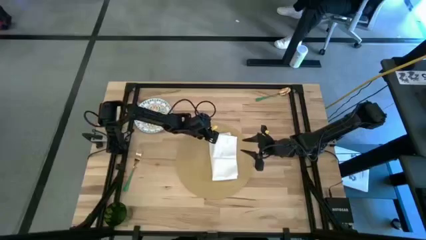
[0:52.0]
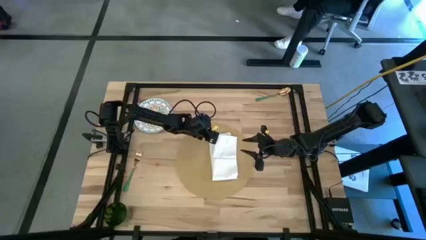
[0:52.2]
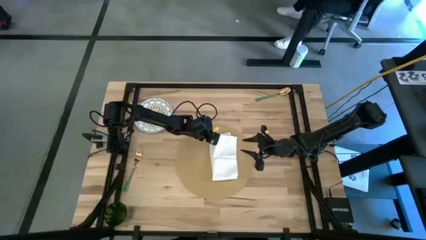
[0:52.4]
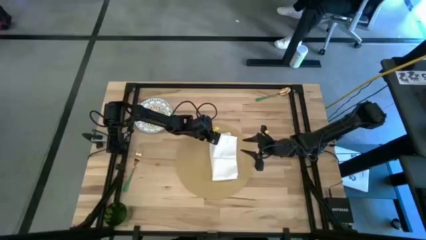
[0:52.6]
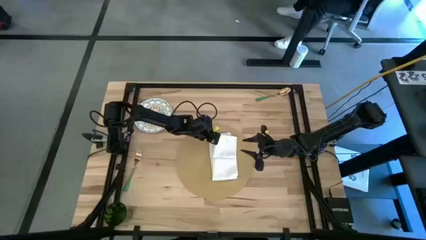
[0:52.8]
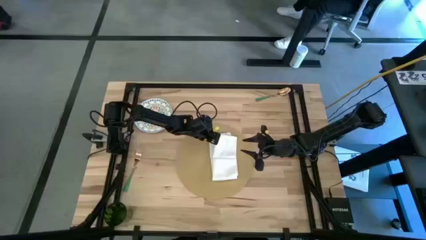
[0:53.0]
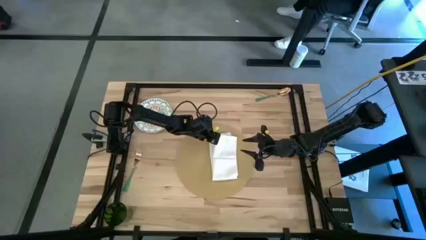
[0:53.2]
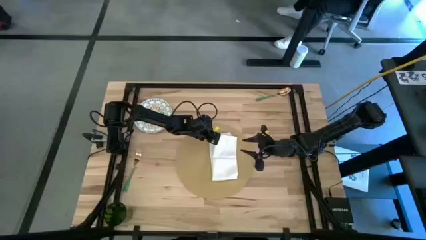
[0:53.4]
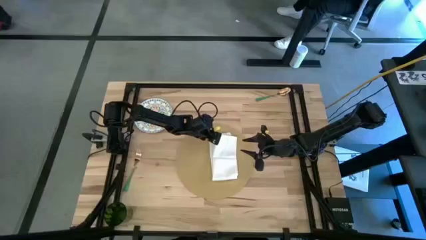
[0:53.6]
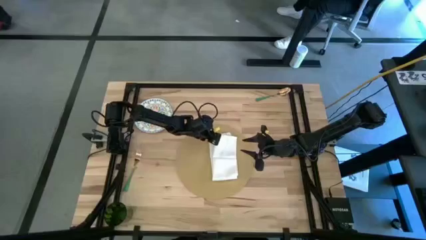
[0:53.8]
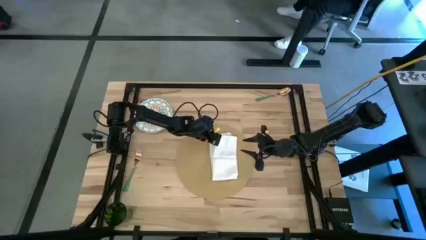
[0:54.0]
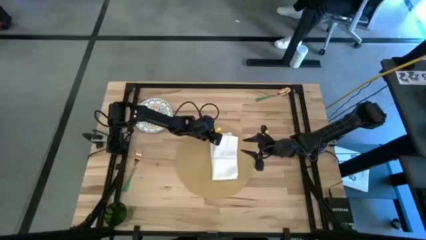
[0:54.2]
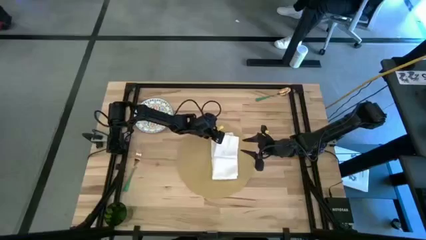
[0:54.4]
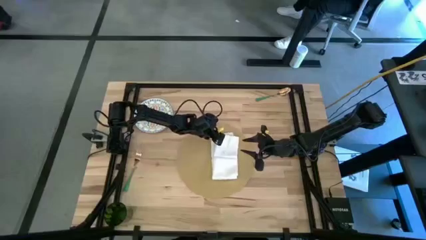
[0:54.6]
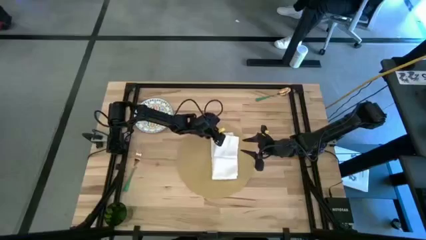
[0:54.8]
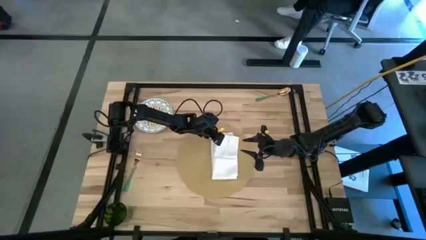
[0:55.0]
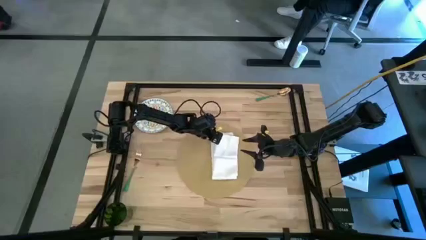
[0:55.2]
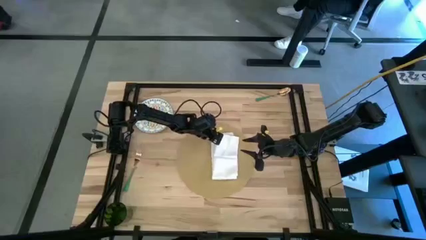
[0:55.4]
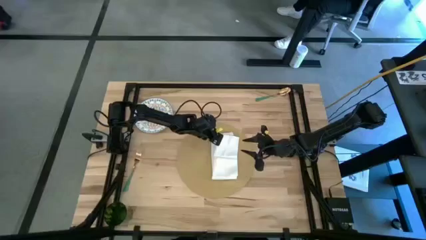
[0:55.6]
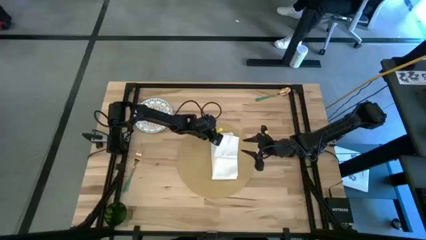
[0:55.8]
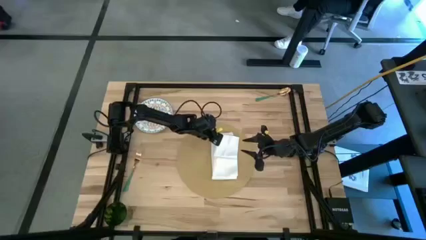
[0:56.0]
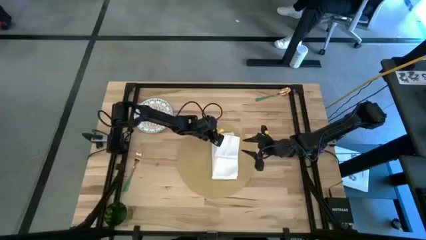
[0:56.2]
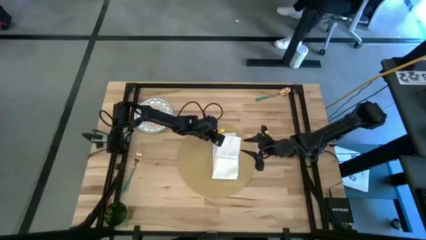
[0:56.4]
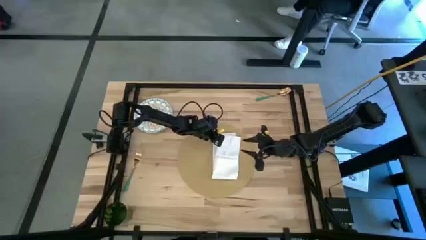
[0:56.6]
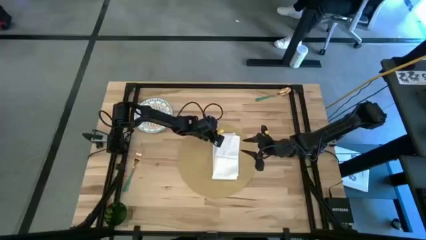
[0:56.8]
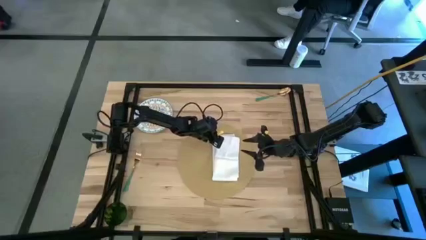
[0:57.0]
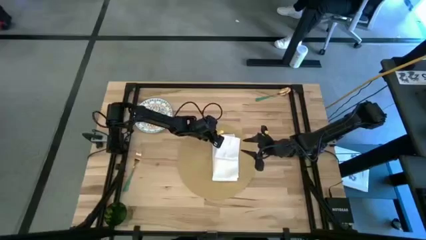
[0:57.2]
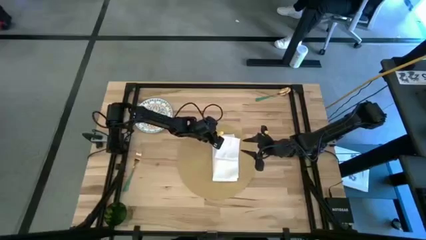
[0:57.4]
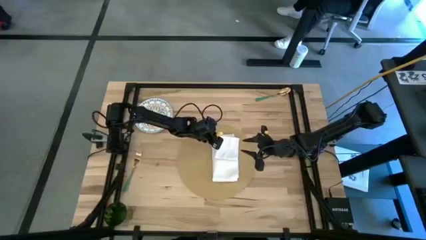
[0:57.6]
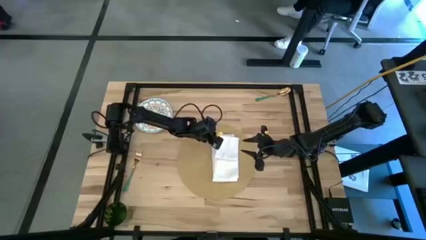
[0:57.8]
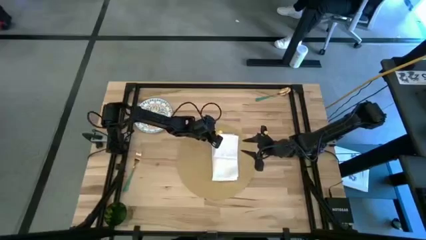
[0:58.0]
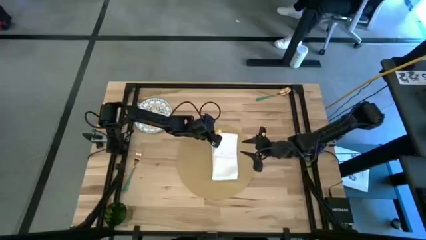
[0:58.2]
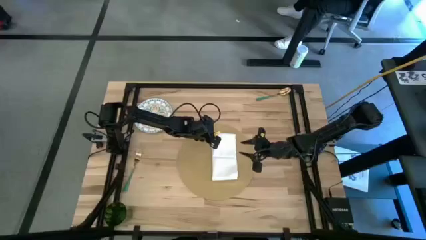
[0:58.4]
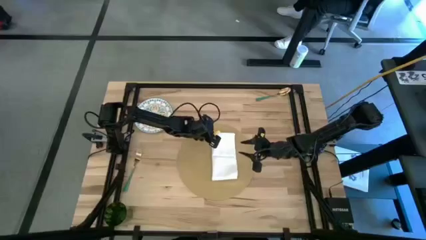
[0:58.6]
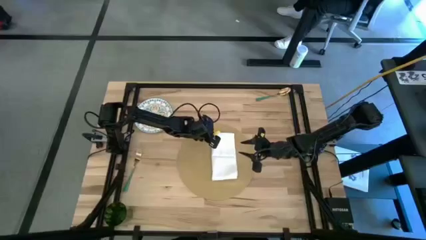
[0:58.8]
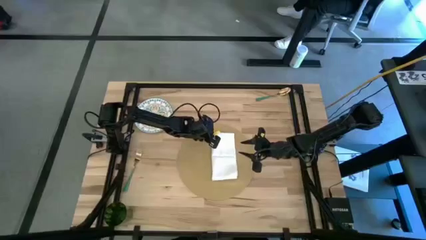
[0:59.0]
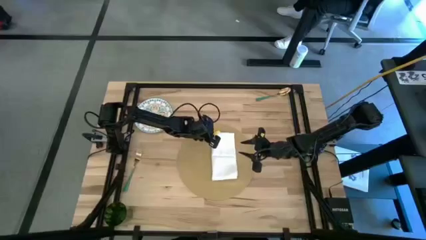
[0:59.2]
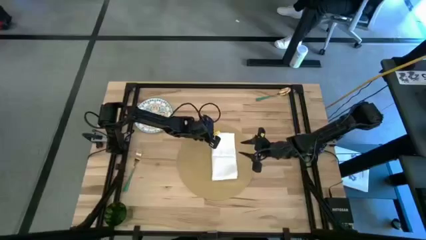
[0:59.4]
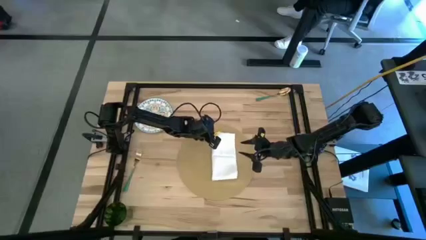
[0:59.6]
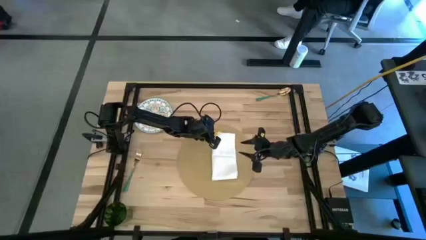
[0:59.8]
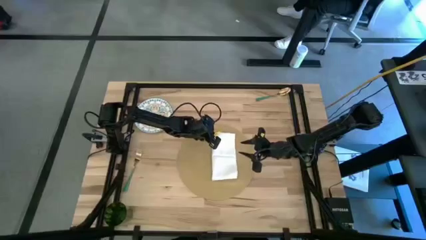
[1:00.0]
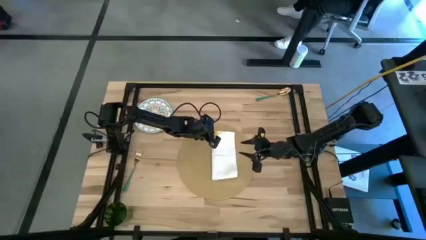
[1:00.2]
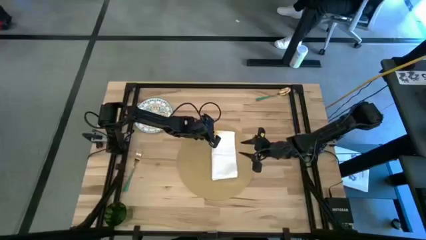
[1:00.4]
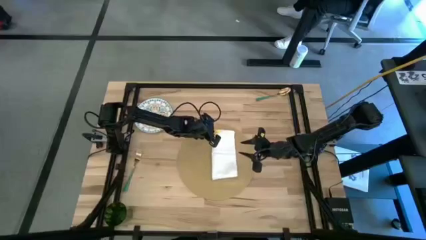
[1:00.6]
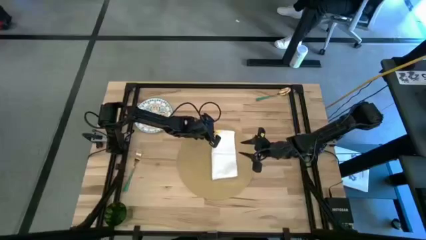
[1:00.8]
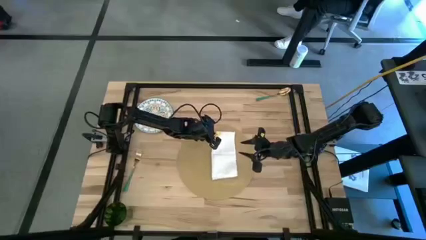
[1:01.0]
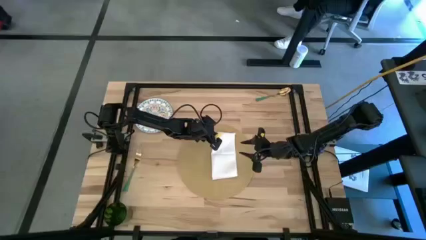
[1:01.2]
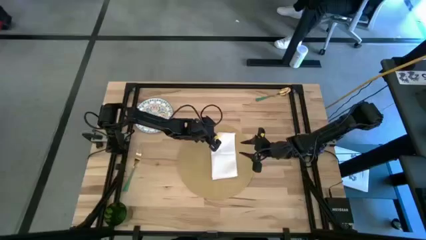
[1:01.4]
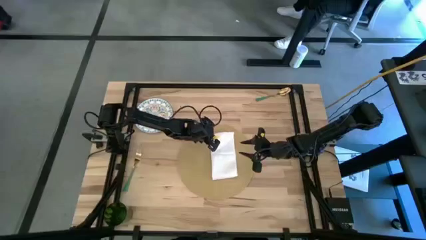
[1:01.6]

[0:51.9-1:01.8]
Task: Set table place
Fold the table napkin
